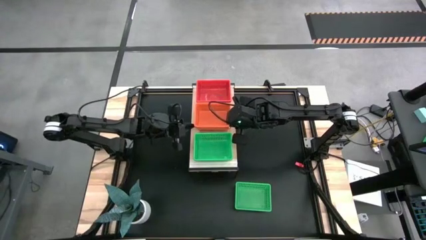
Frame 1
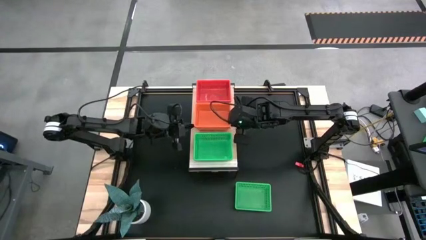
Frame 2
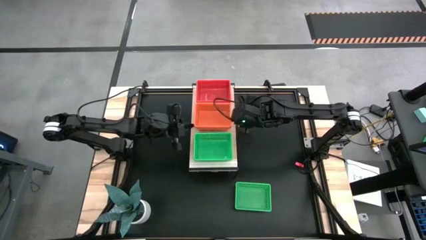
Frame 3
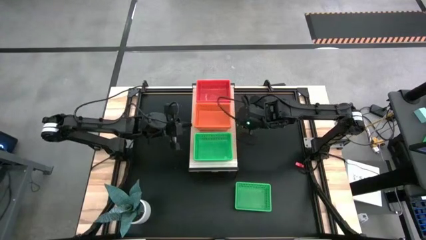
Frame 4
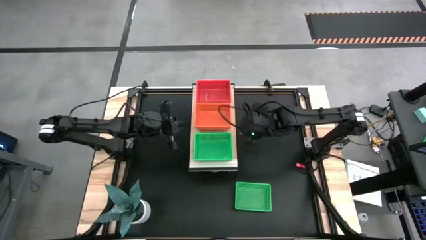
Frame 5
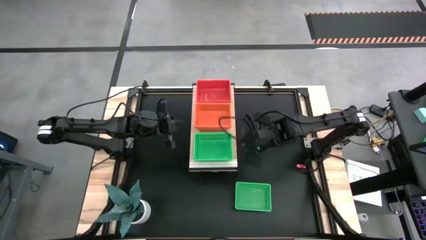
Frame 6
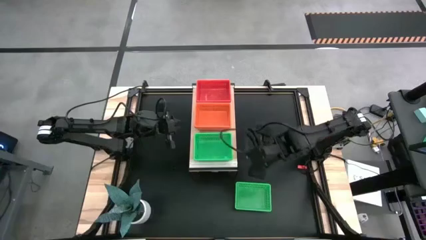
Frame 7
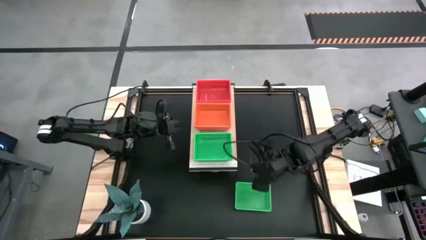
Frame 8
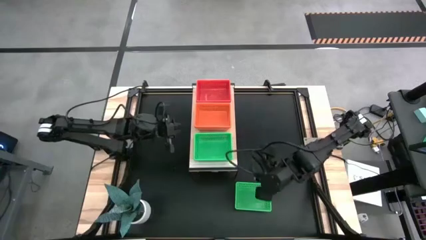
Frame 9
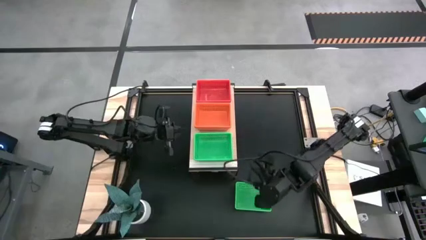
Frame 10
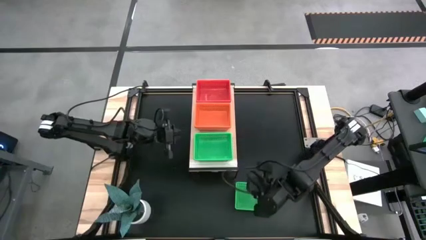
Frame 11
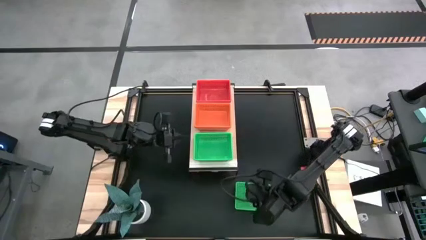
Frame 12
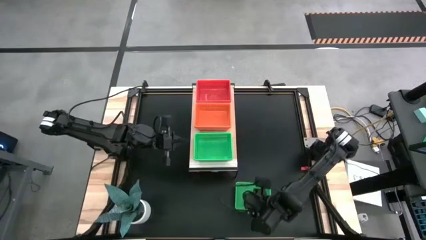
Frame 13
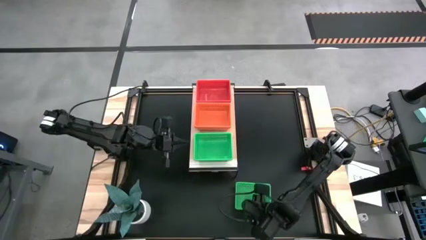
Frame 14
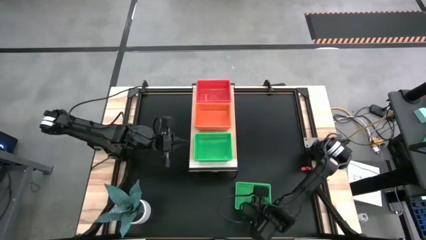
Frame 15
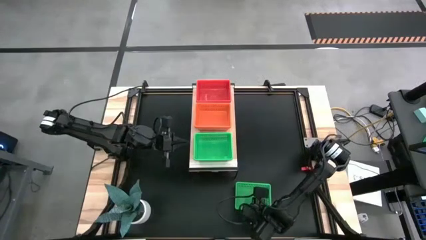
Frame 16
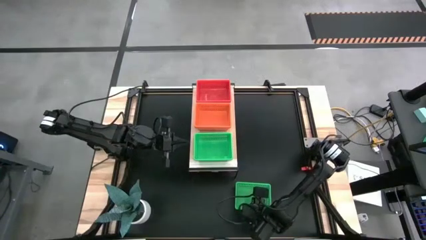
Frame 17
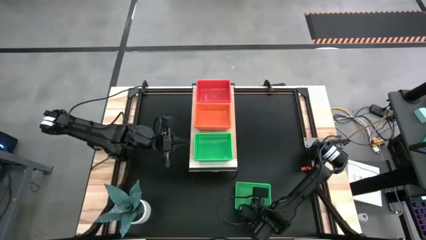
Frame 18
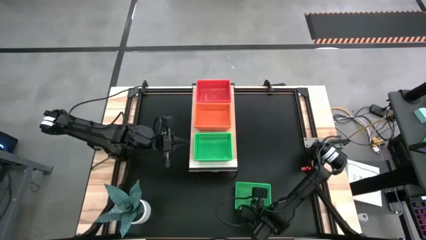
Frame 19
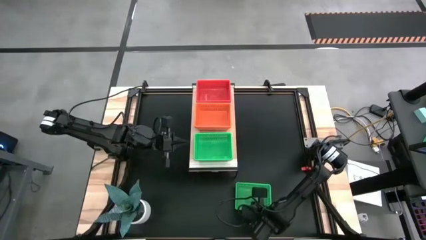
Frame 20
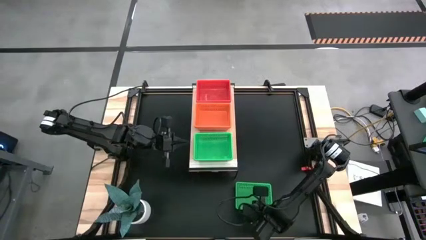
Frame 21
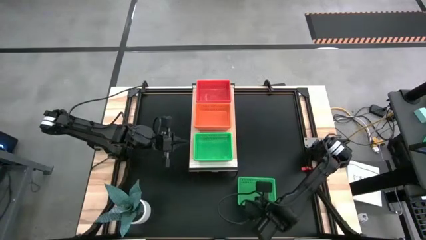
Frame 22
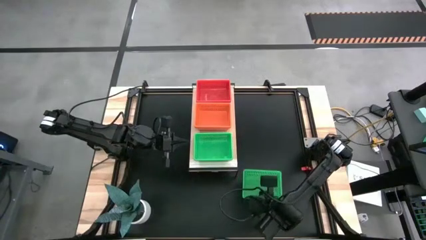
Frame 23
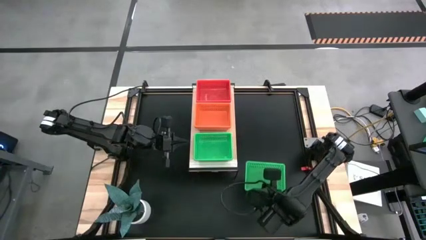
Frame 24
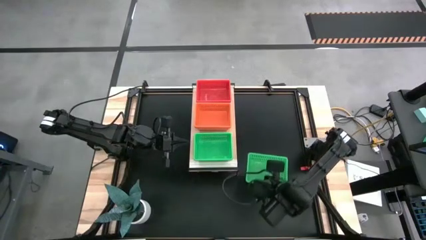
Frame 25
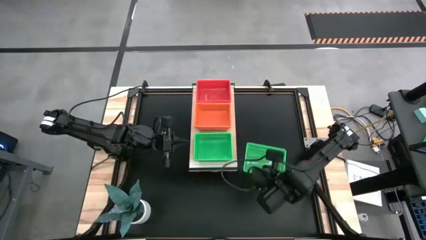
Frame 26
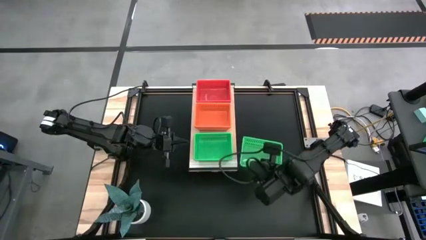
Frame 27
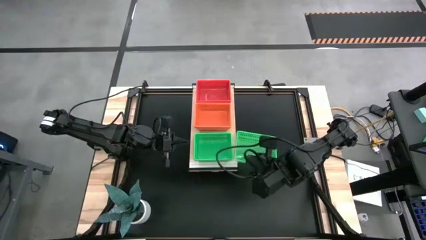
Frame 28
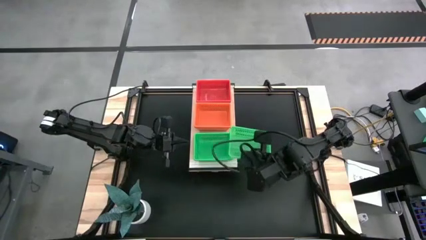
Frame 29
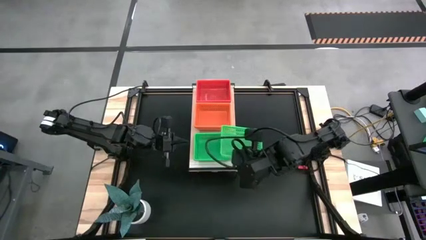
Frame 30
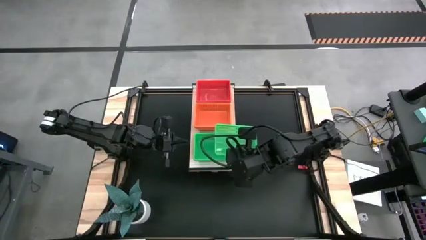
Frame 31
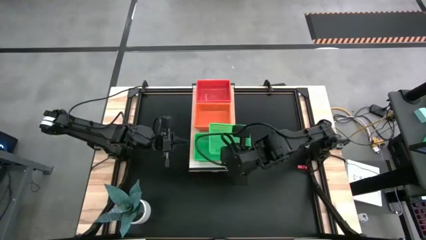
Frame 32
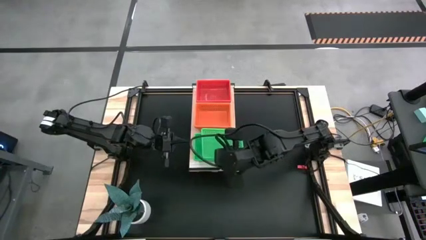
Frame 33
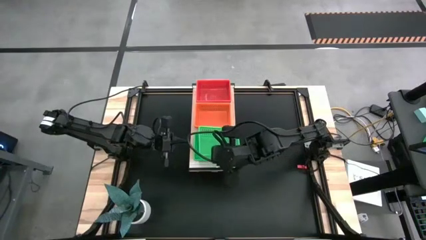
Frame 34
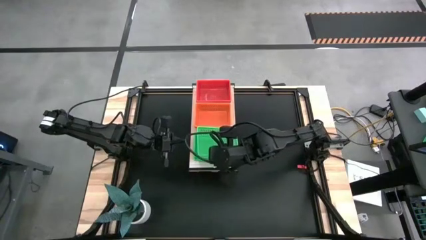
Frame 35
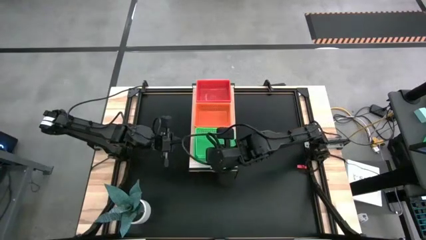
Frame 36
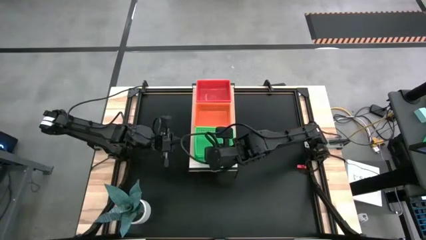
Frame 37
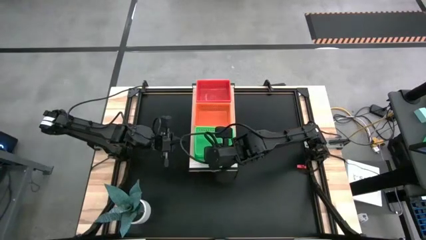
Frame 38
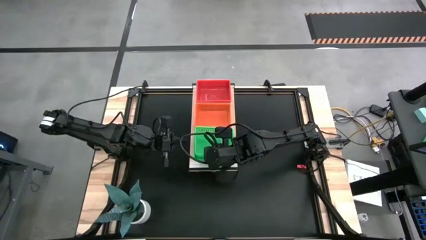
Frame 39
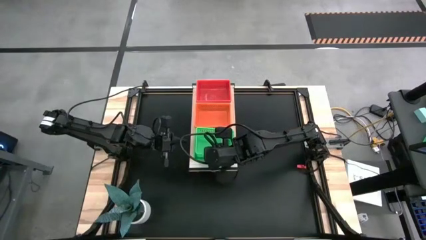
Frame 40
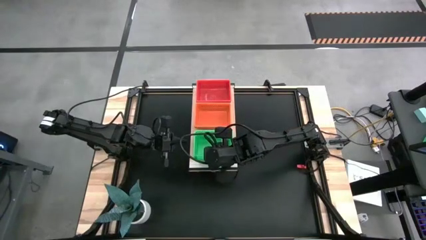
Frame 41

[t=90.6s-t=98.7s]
Task: Stack baskets on shelf by color
Stack the green bin on the green bins on the shelf

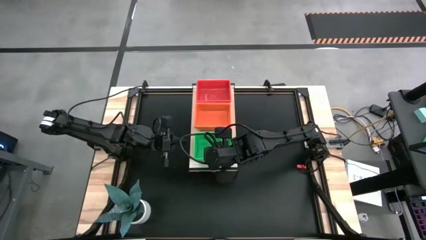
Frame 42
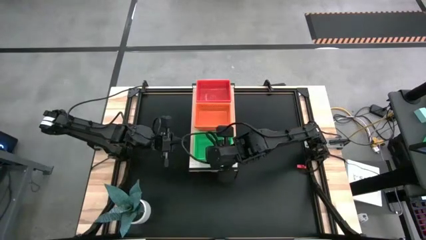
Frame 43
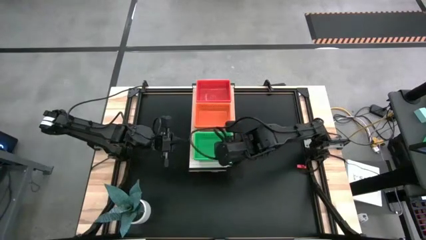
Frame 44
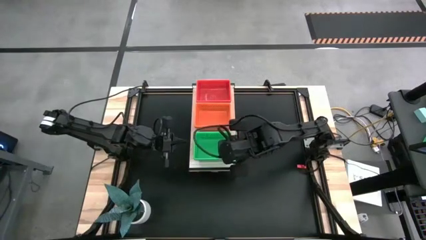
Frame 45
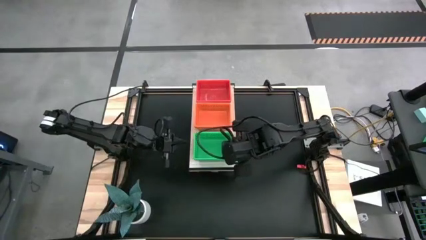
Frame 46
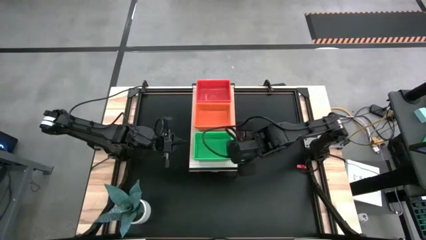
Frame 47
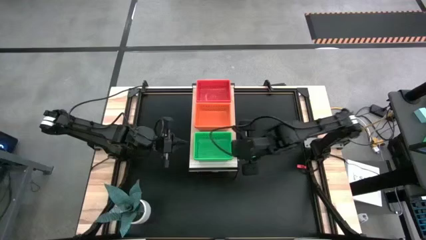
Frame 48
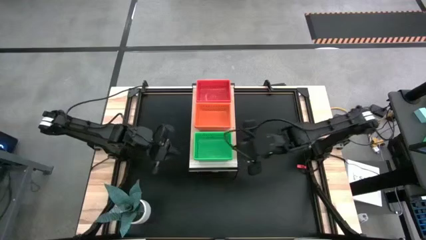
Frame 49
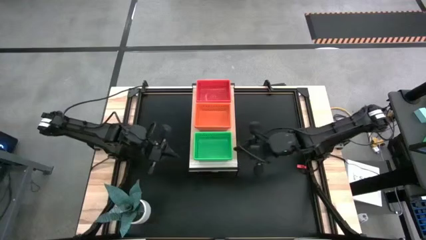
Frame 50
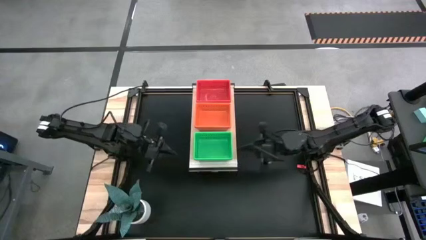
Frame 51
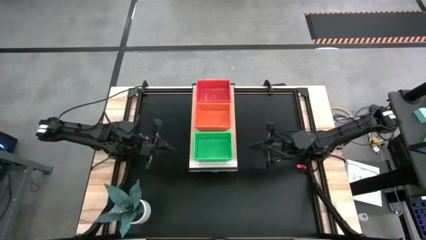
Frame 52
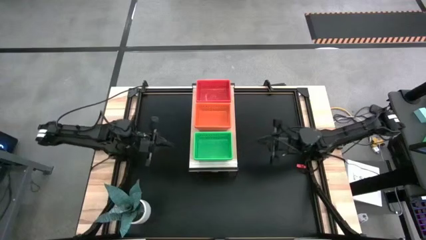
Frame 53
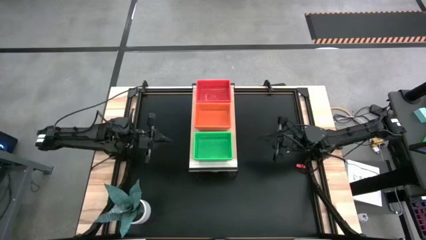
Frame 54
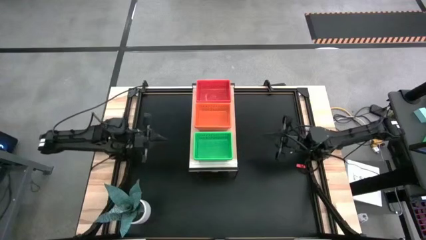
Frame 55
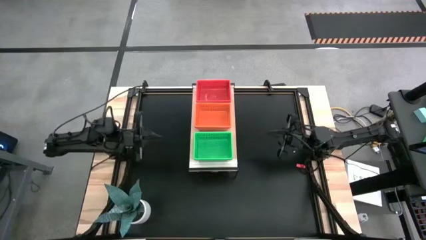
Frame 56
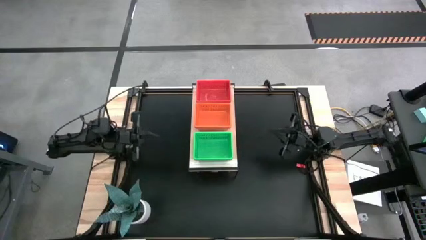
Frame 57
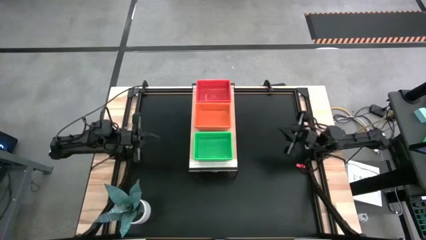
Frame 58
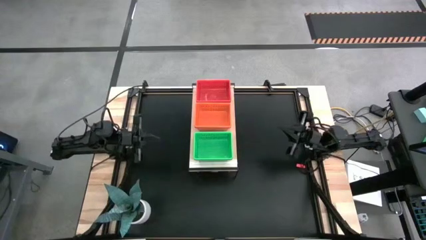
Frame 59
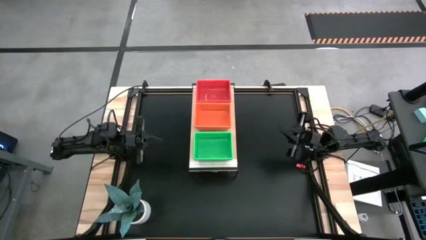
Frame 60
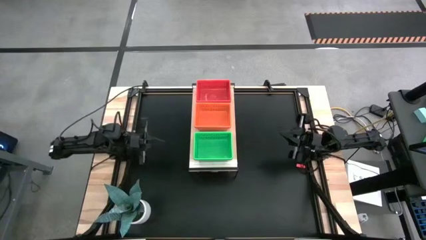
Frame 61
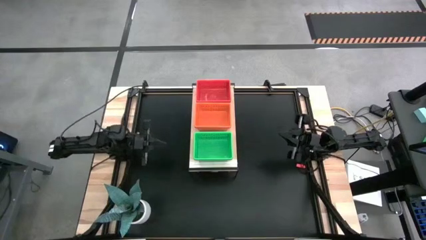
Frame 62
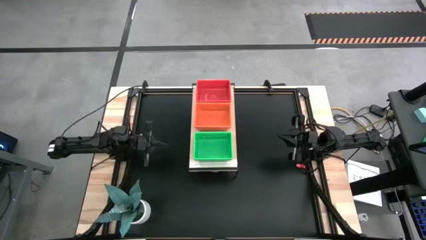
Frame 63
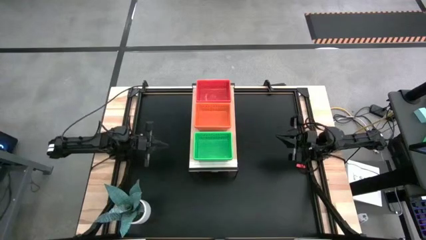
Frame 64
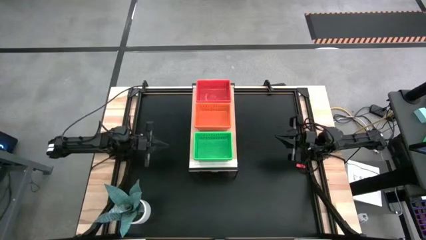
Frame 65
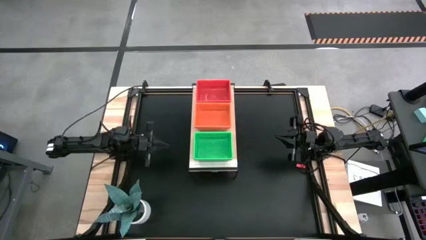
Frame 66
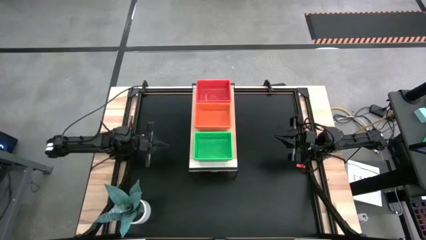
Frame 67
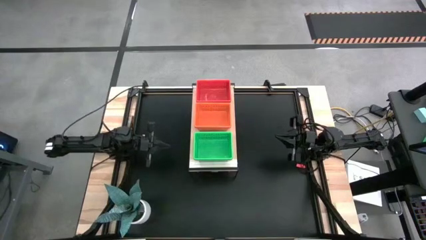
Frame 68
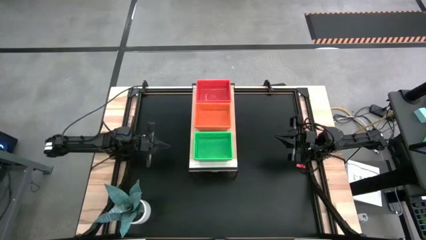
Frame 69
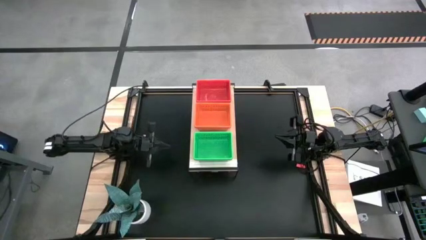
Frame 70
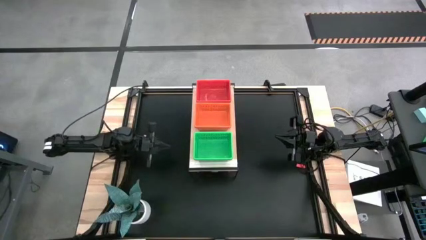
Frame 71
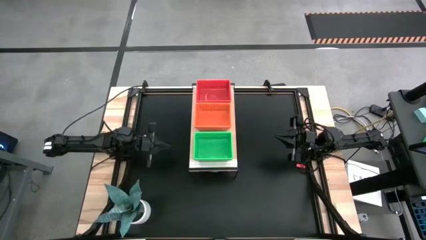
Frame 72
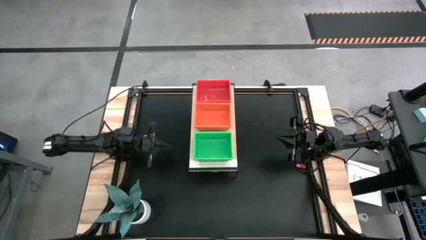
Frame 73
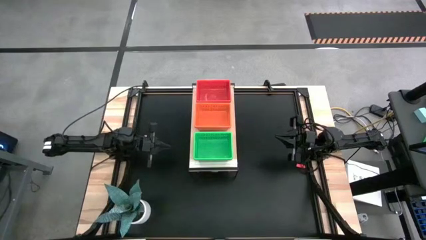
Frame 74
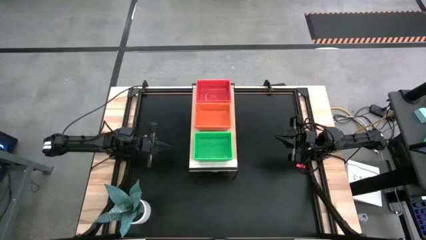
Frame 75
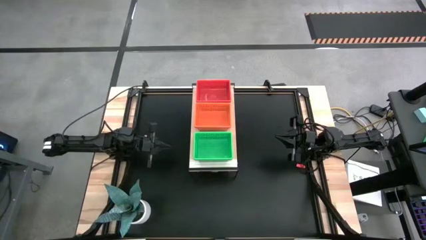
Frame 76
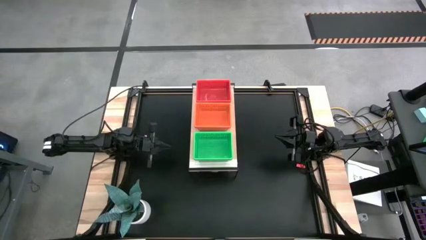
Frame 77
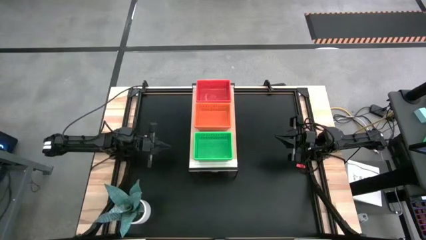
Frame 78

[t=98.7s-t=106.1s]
Return to Home Position
